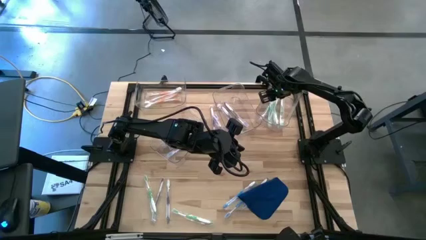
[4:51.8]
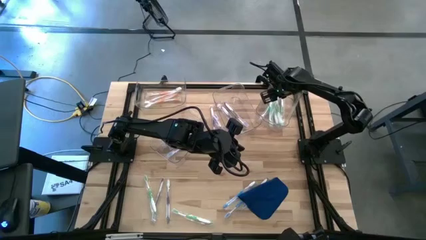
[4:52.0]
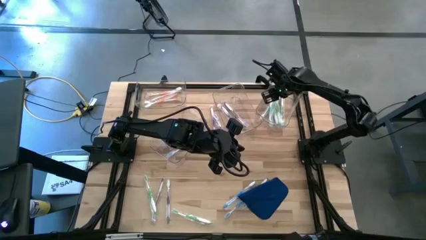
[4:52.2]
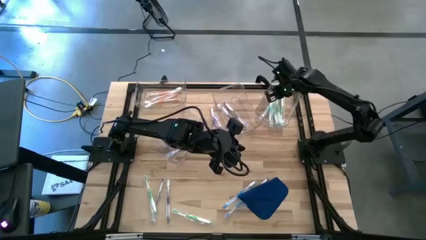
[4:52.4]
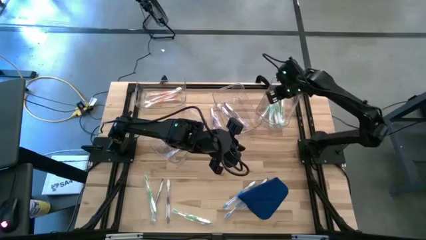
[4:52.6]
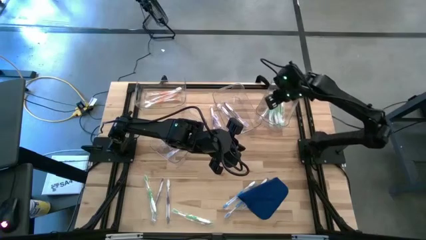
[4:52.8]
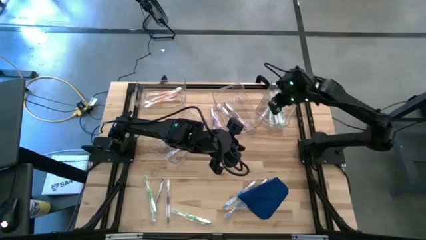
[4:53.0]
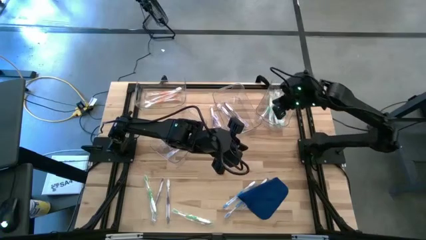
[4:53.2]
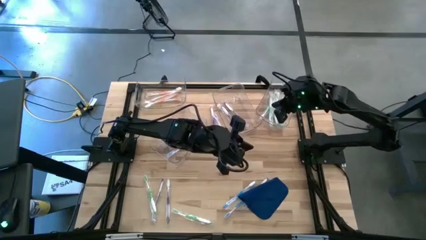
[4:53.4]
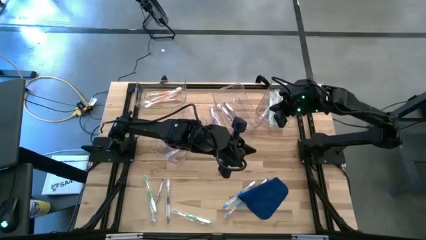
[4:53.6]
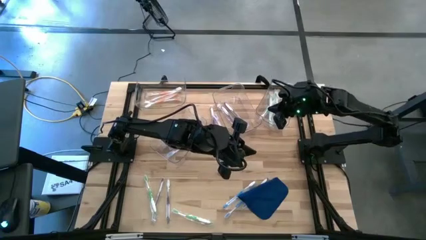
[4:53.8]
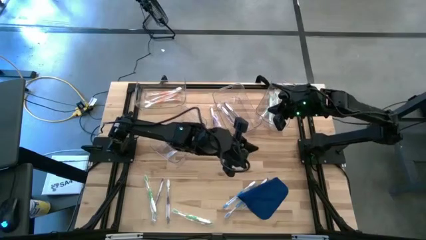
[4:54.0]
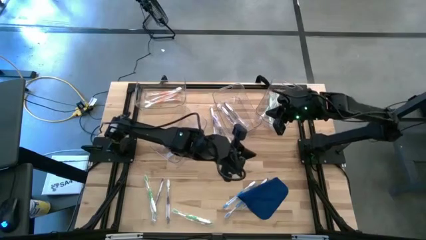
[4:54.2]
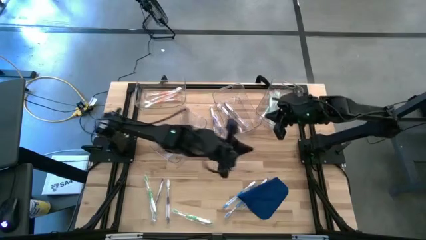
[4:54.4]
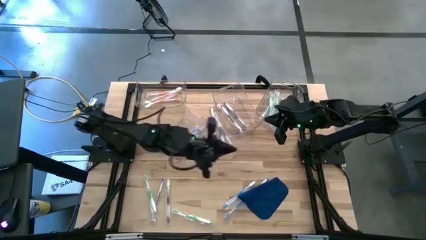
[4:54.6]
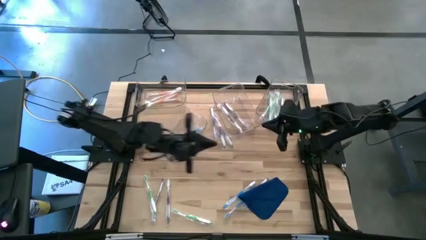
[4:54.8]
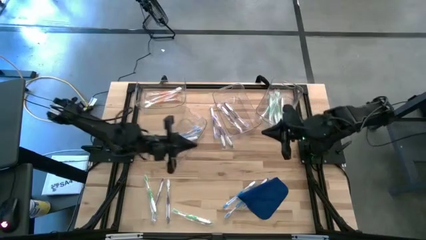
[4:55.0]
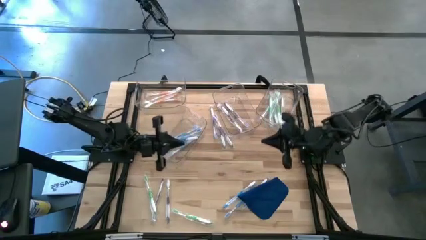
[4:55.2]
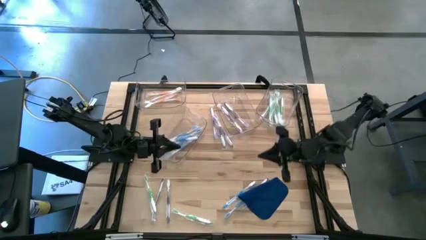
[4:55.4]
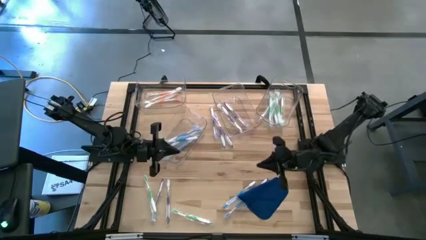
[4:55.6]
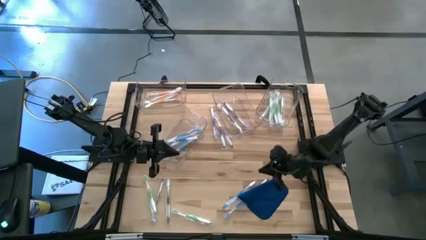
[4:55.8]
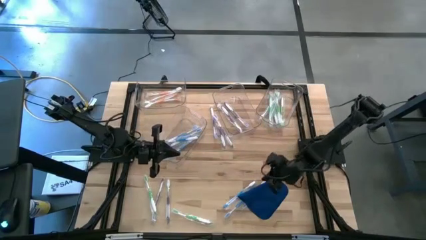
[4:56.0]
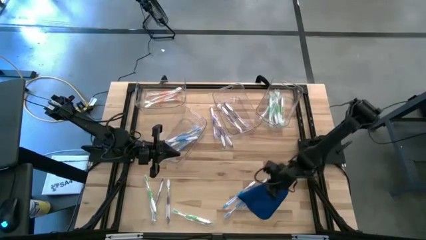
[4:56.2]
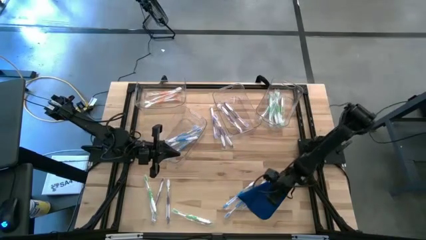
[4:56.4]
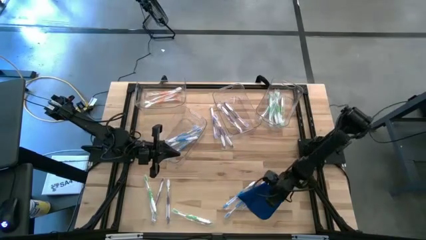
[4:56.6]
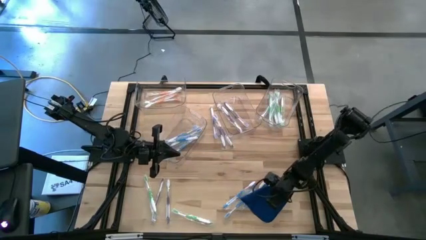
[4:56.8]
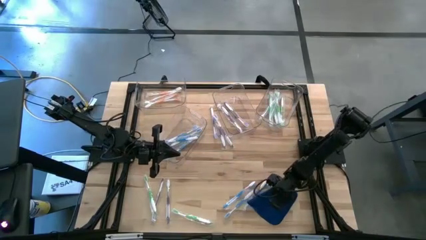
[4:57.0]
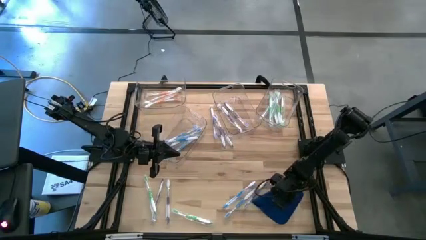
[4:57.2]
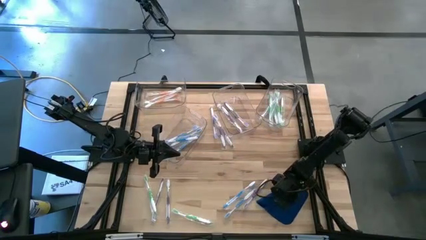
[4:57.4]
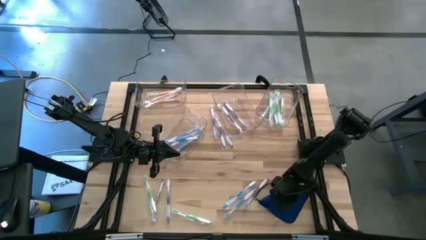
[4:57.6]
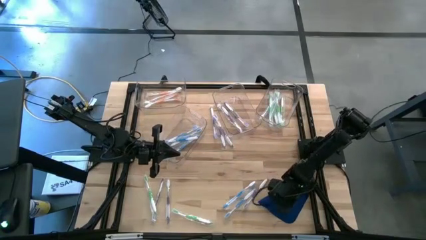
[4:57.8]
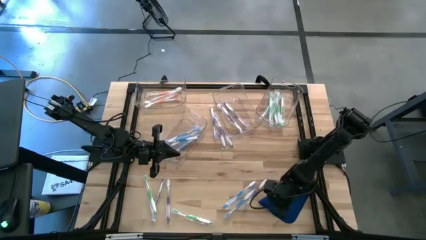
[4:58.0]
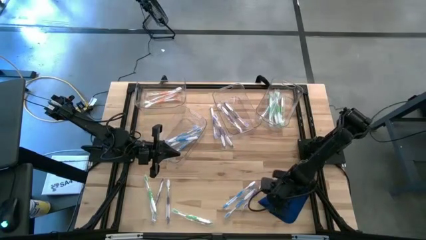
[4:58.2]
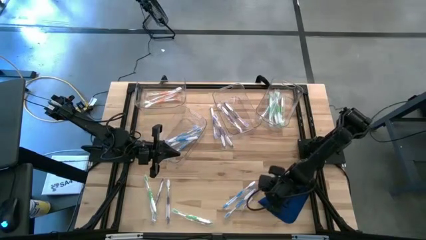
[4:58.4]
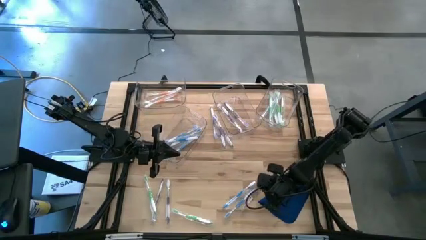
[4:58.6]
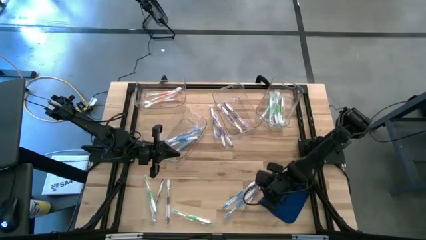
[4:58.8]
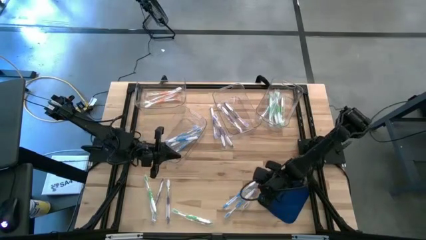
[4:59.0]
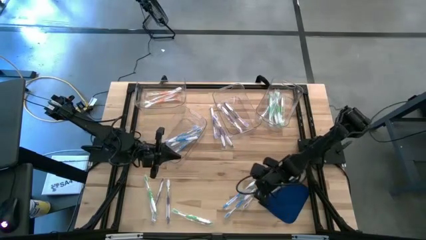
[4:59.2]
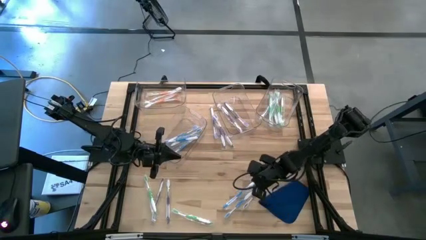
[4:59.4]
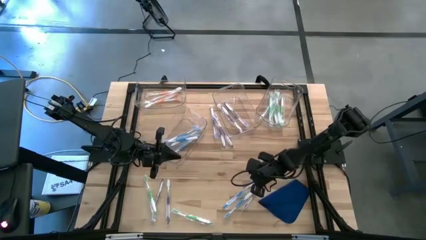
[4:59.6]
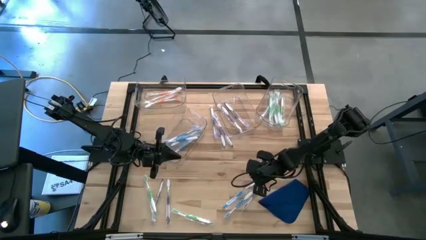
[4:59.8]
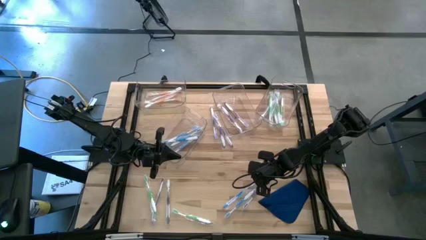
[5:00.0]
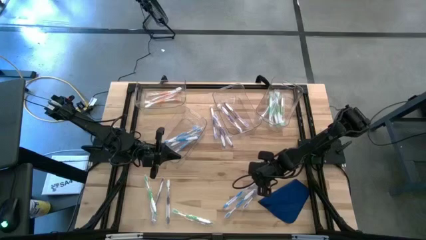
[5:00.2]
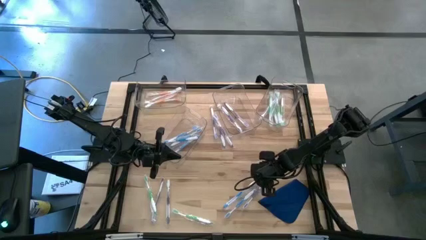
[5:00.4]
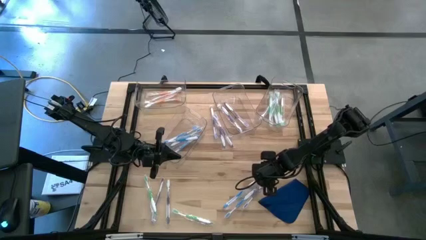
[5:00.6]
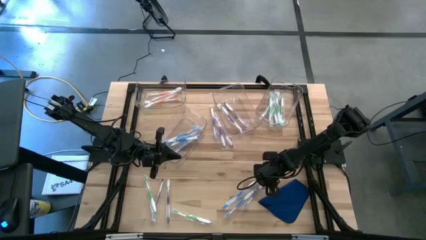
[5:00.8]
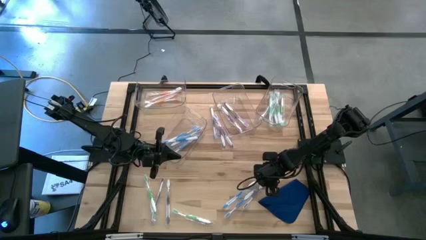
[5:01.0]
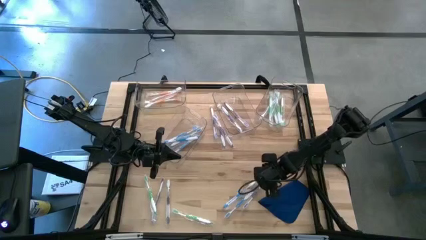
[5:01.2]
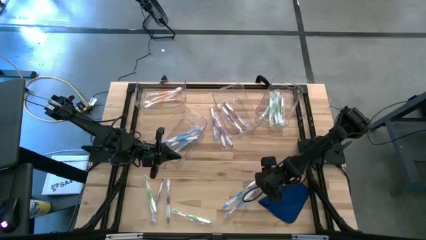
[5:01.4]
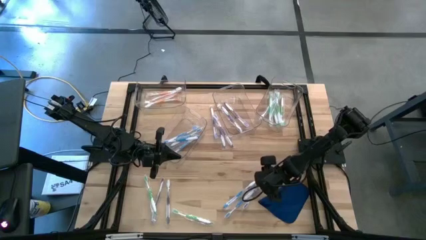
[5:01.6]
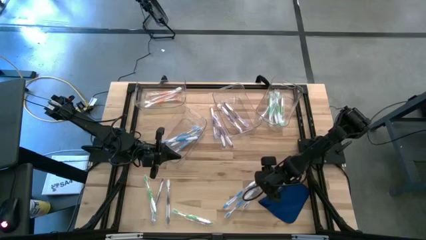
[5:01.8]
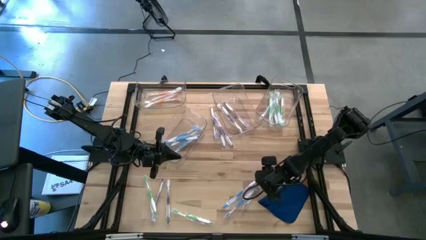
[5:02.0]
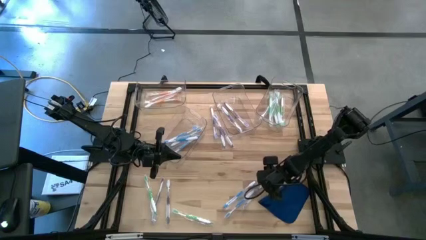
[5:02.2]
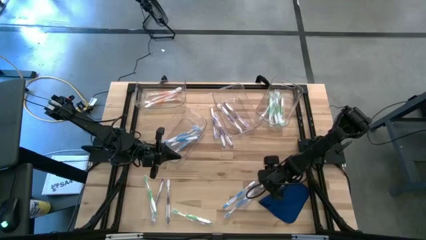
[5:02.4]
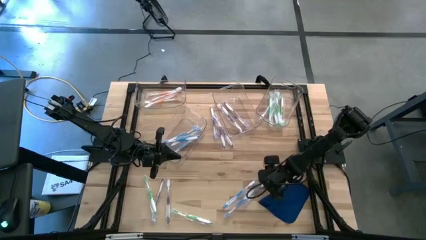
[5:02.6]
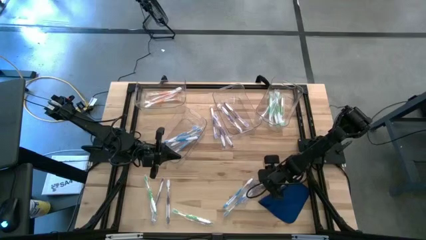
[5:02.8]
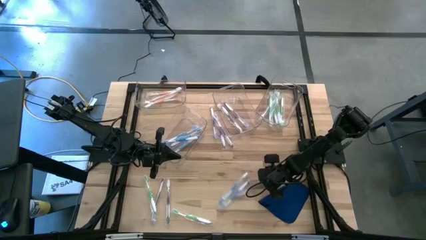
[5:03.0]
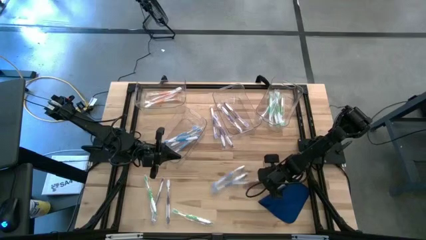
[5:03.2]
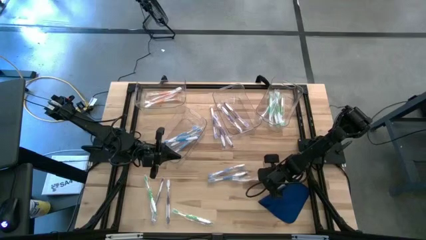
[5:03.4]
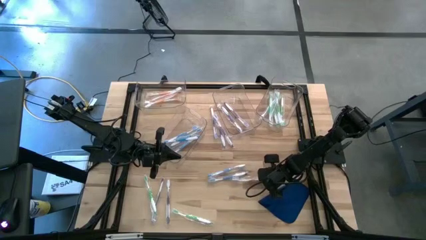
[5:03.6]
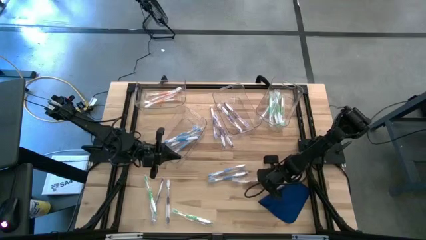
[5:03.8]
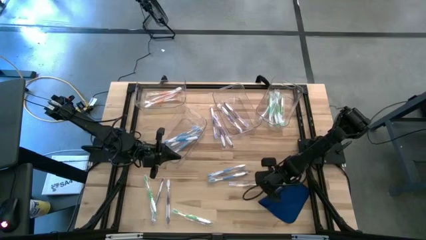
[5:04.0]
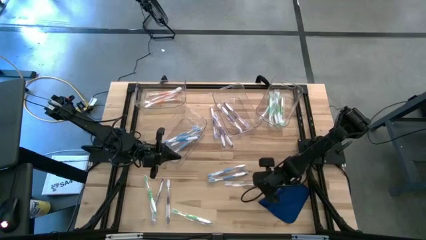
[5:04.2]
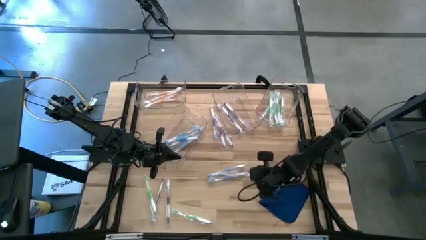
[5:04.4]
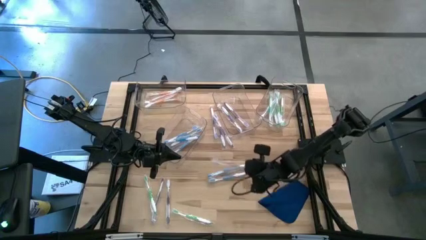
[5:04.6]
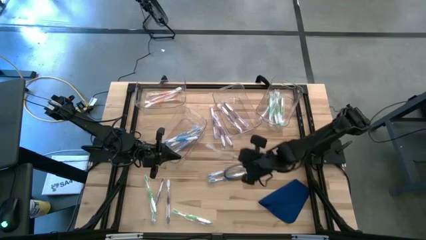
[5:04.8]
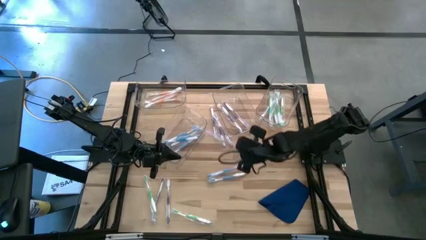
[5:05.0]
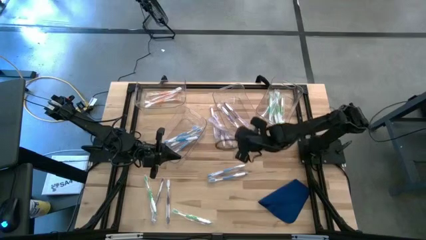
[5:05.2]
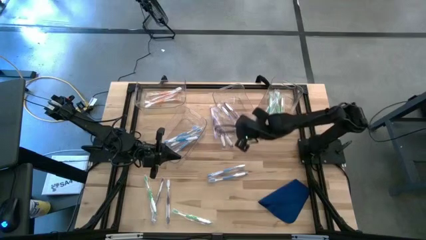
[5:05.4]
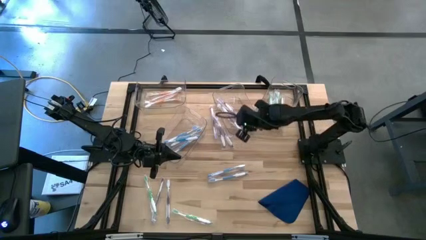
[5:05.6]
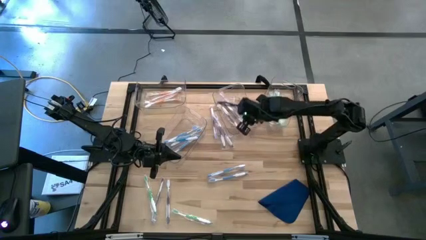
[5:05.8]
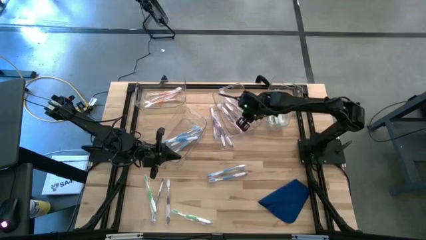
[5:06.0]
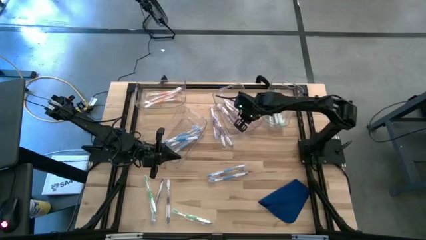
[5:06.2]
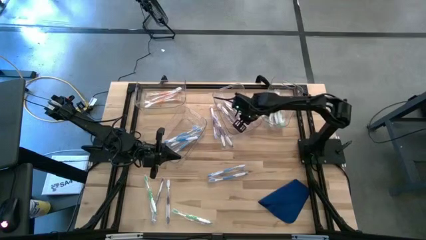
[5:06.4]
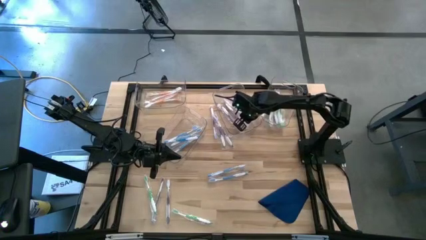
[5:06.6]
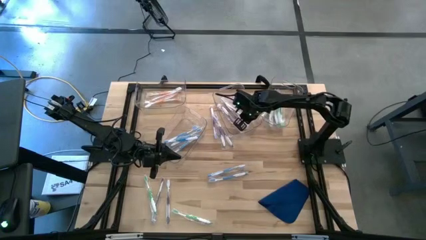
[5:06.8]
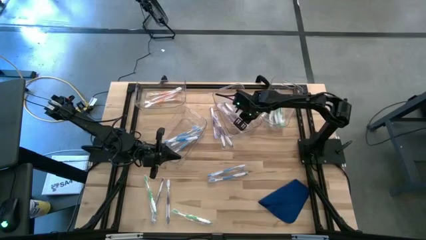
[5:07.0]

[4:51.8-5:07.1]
Task: Pick & Place Toothbrushes
Put the purple toothbrush into the top center transparent bin
